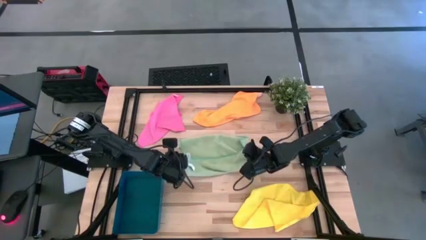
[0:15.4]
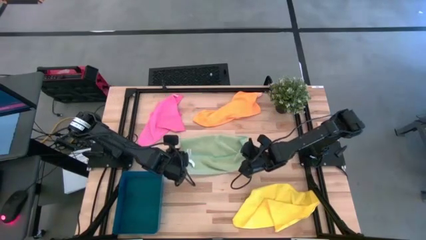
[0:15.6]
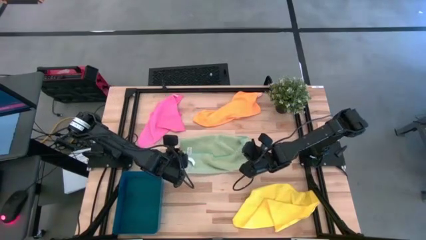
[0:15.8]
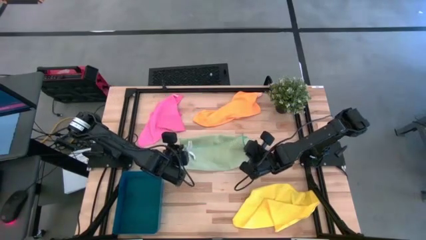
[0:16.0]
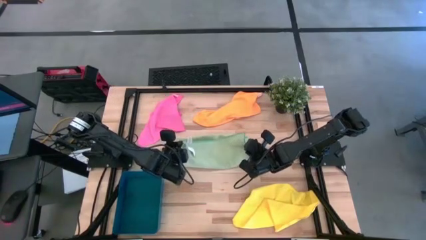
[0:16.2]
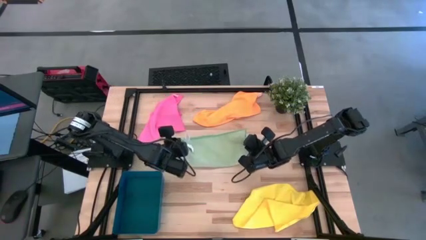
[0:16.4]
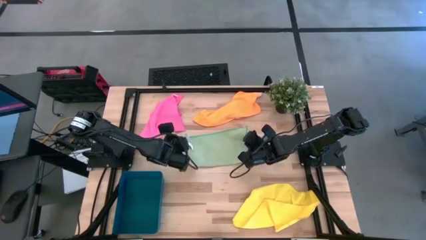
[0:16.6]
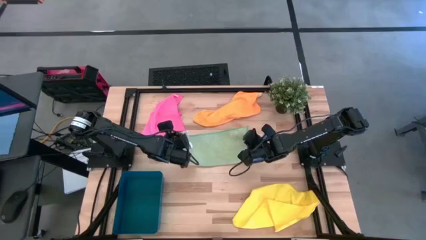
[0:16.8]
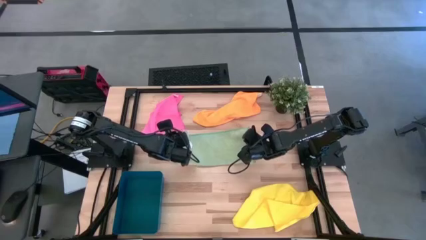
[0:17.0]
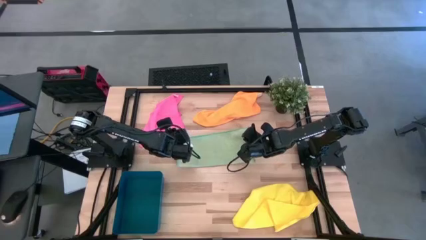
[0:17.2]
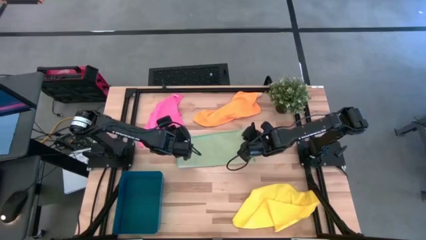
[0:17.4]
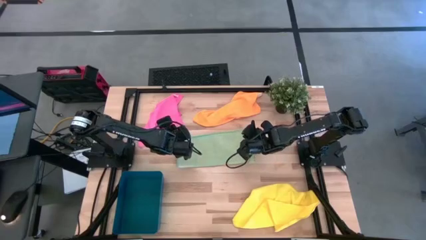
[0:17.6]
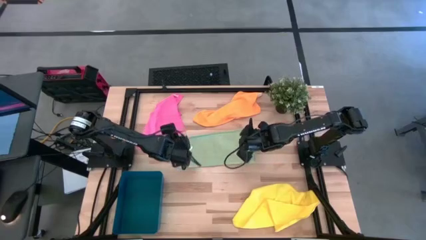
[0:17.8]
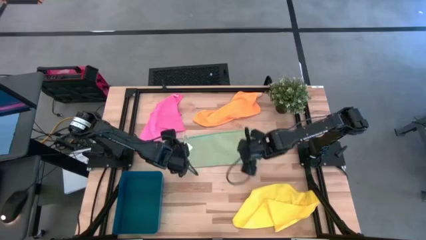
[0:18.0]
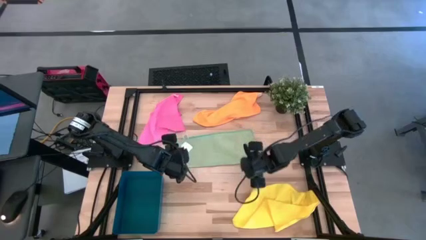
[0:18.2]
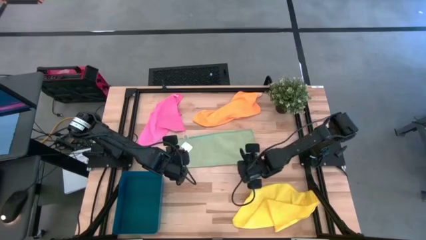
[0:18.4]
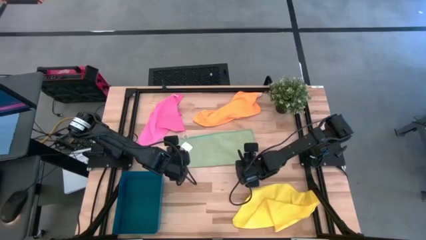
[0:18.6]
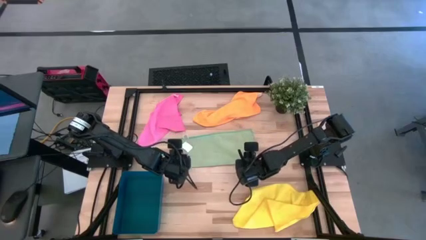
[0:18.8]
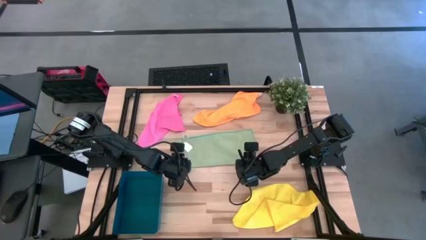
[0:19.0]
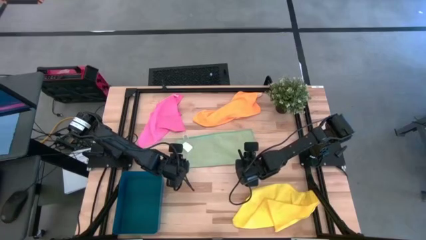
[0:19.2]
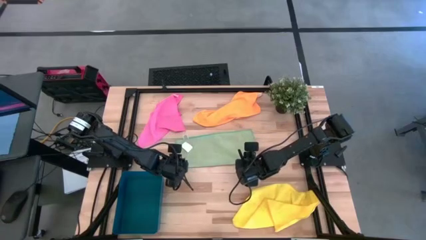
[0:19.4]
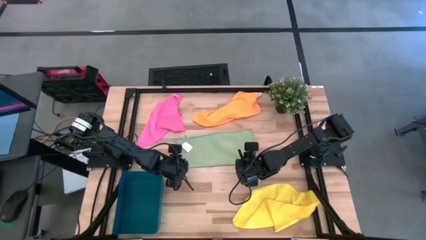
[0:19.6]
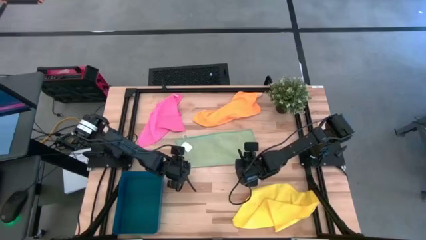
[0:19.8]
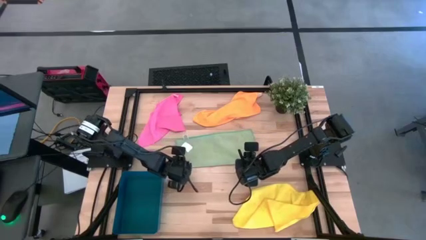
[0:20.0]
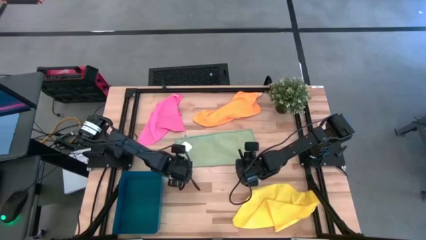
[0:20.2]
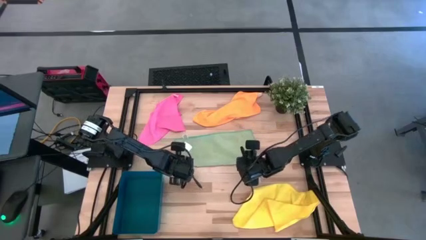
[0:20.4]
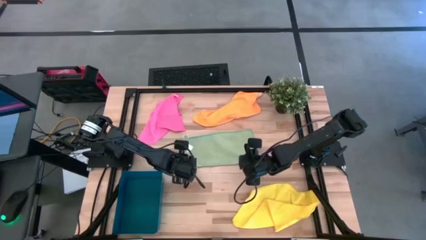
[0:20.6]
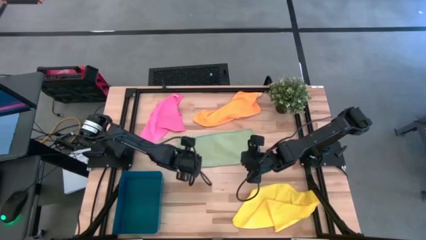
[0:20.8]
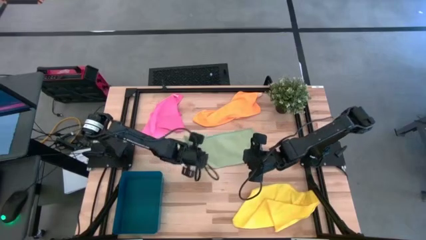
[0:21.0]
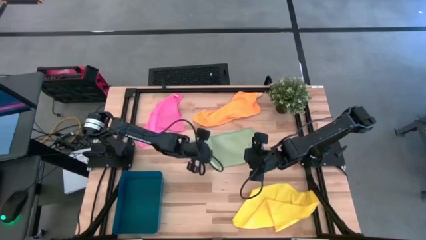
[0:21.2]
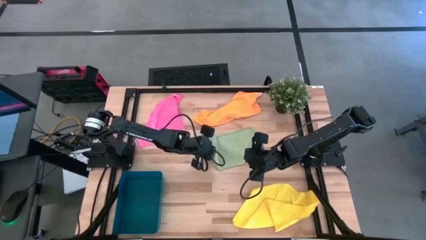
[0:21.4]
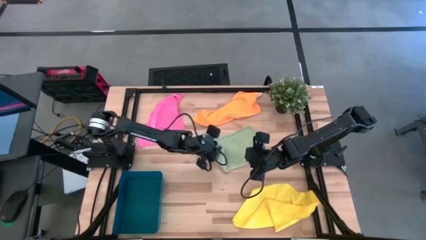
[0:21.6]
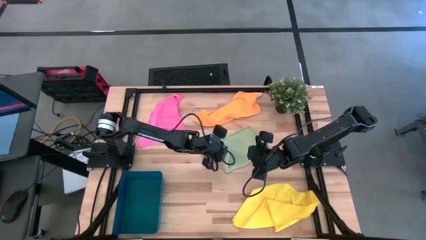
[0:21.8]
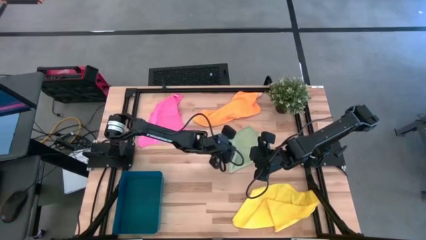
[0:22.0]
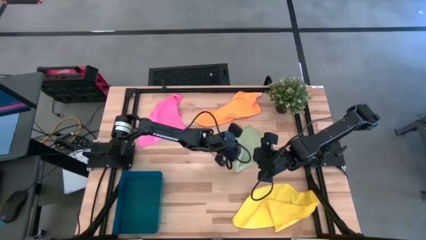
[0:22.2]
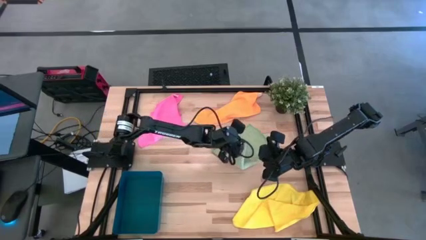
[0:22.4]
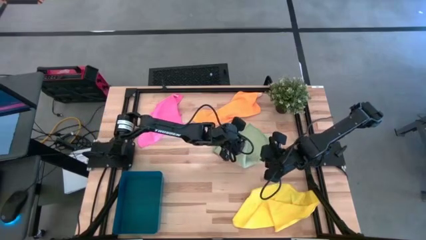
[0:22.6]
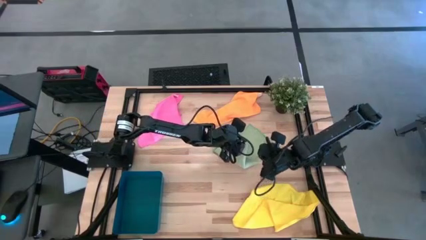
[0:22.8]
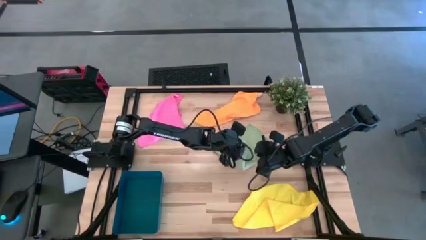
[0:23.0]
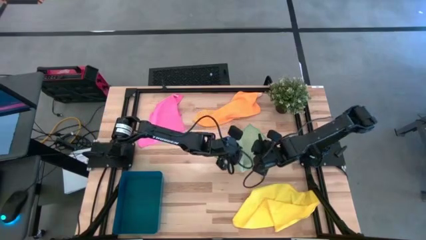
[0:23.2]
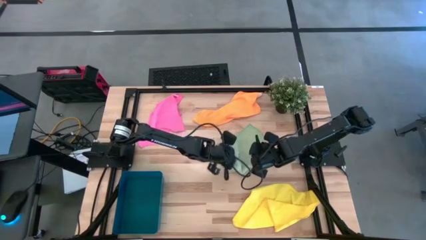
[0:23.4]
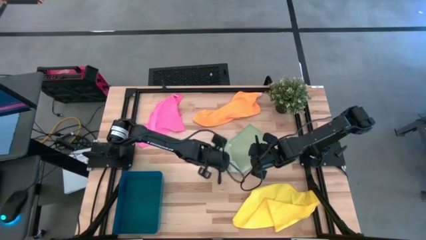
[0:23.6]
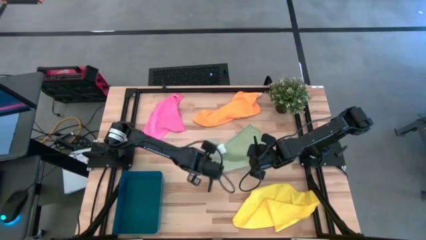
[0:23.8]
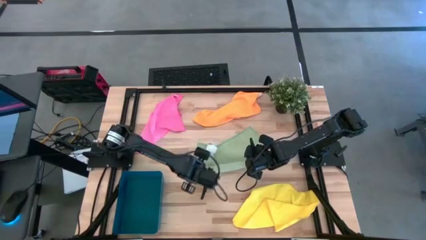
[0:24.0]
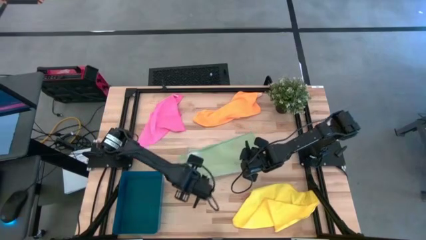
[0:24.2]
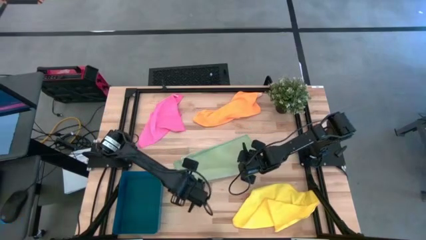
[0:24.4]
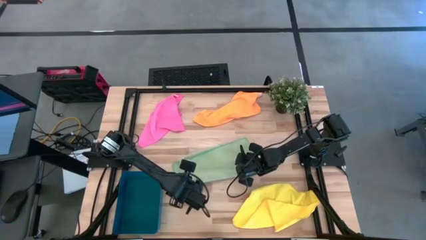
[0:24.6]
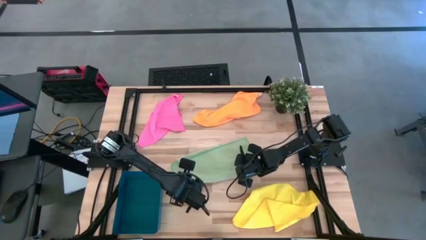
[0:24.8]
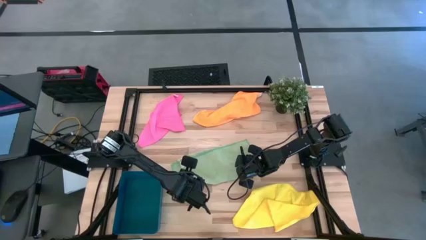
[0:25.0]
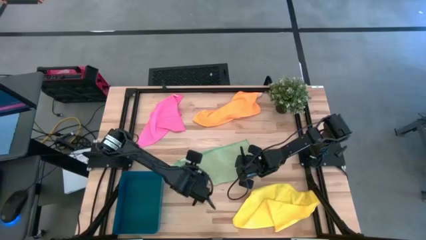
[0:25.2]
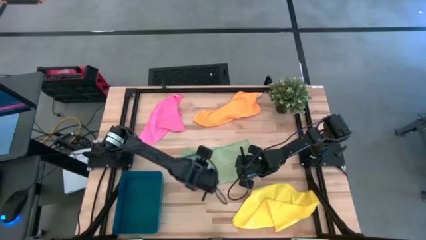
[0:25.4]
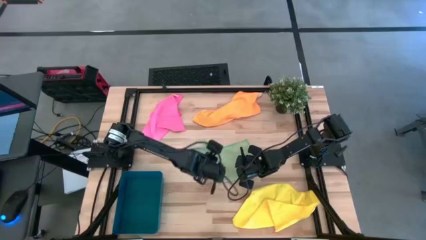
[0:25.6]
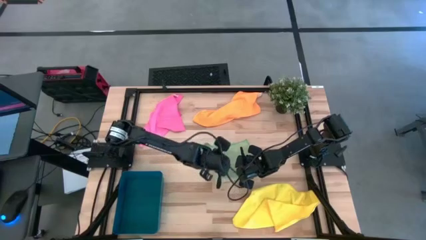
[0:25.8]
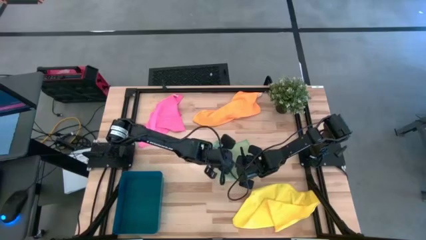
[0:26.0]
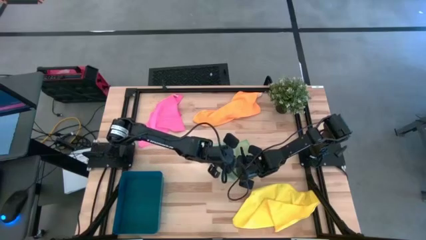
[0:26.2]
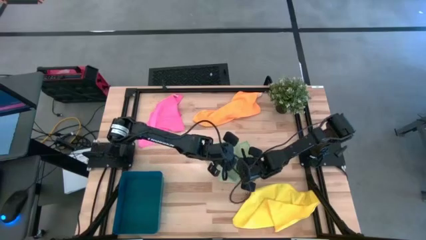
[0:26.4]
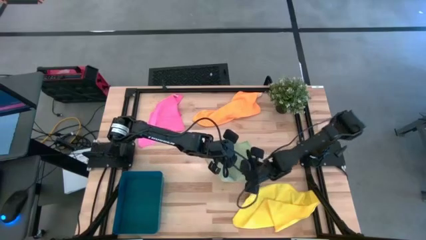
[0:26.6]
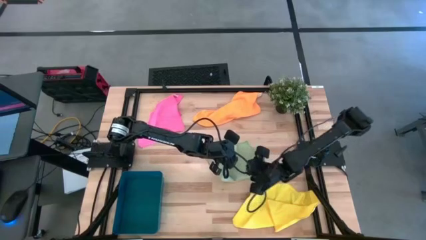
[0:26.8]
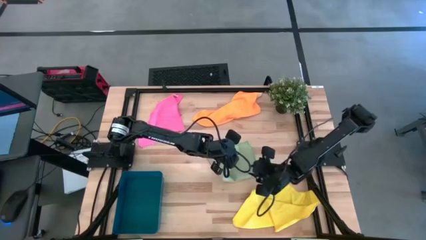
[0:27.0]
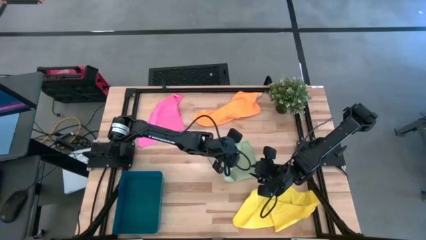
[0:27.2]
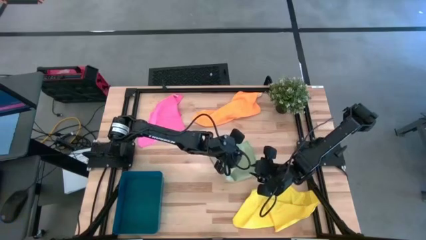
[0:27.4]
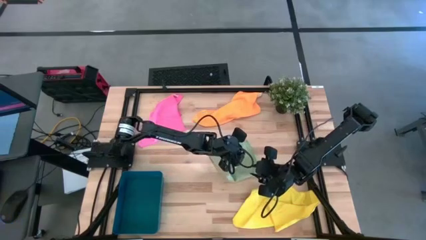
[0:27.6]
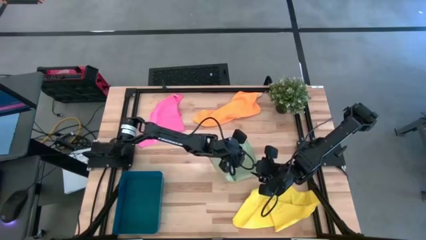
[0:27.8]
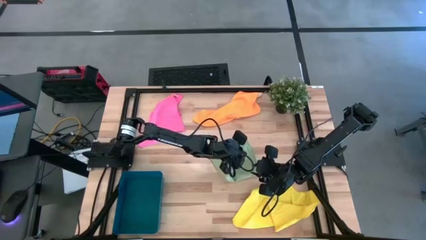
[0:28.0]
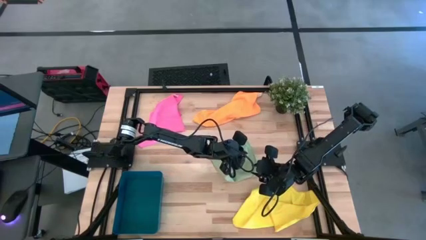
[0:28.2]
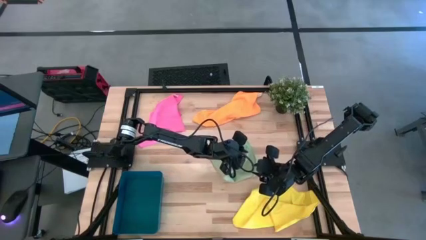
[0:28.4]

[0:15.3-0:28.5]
Task: Fold microfiber towels
Fold the green microfiber towel
